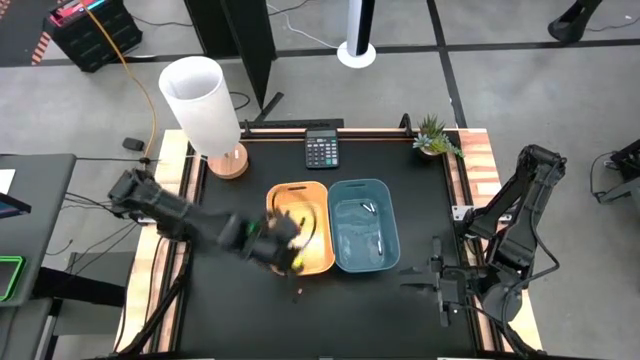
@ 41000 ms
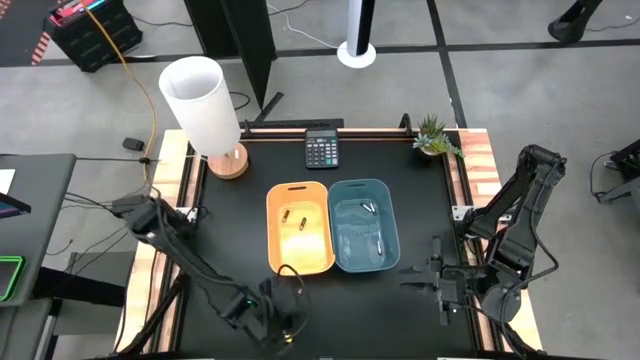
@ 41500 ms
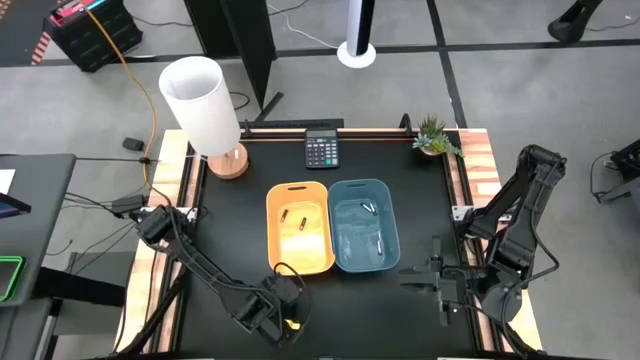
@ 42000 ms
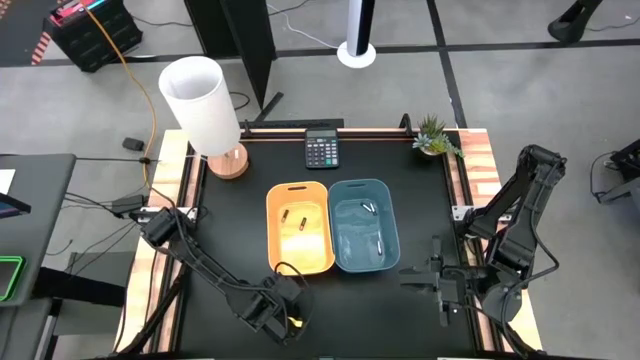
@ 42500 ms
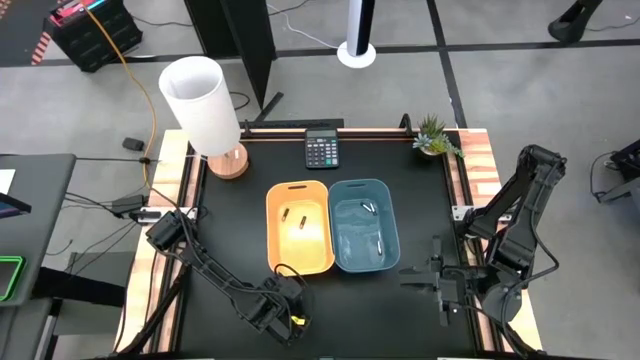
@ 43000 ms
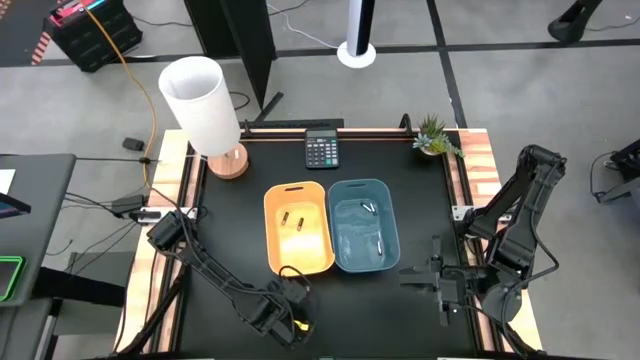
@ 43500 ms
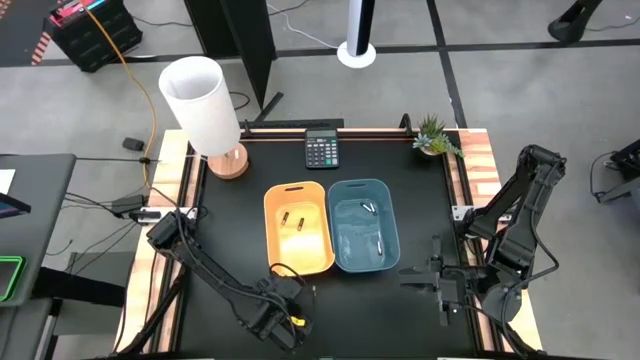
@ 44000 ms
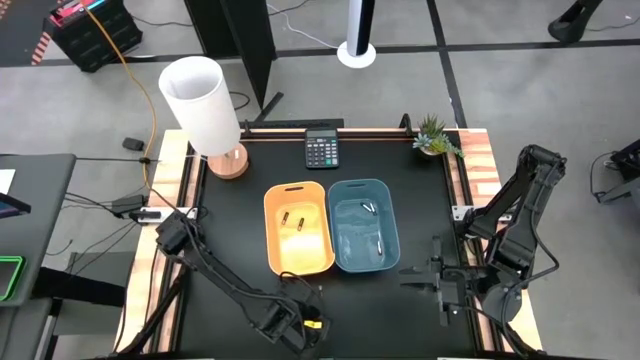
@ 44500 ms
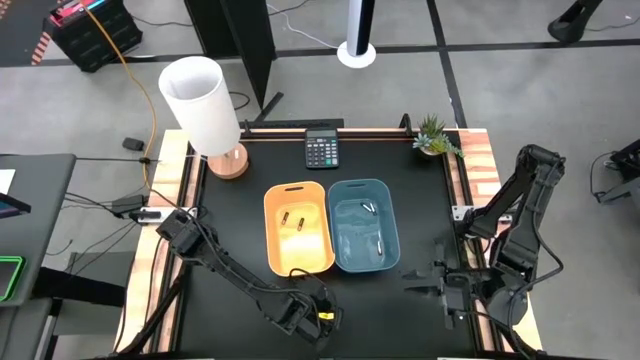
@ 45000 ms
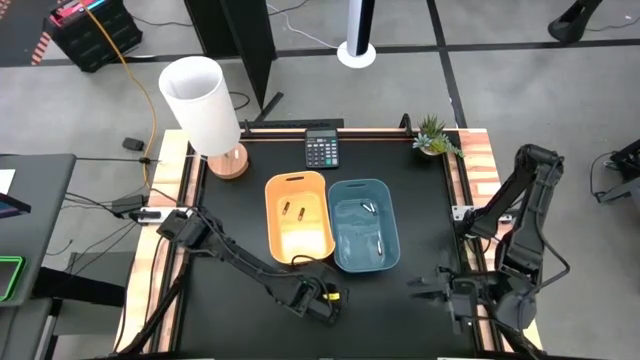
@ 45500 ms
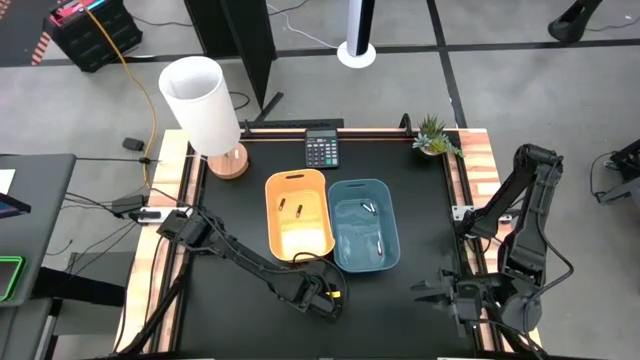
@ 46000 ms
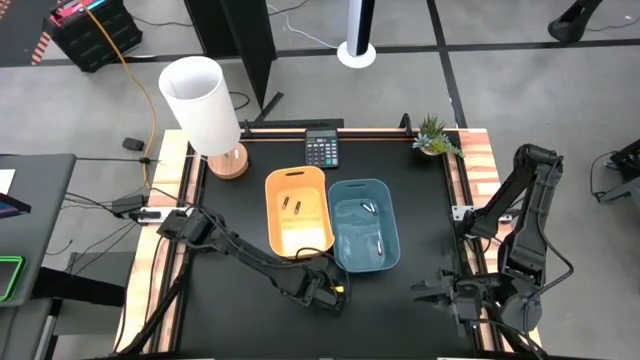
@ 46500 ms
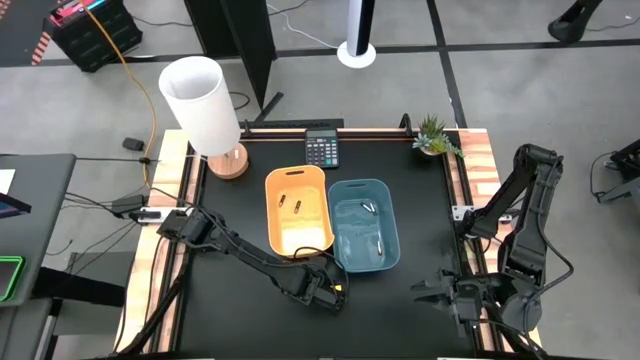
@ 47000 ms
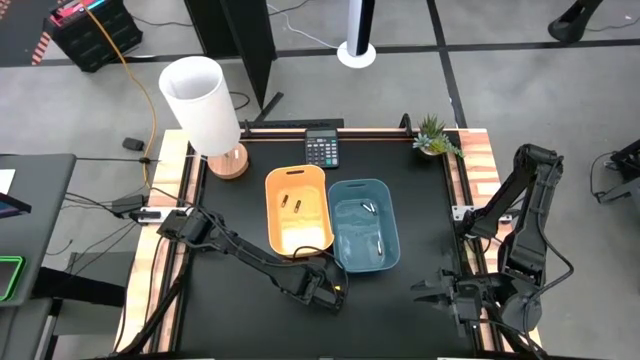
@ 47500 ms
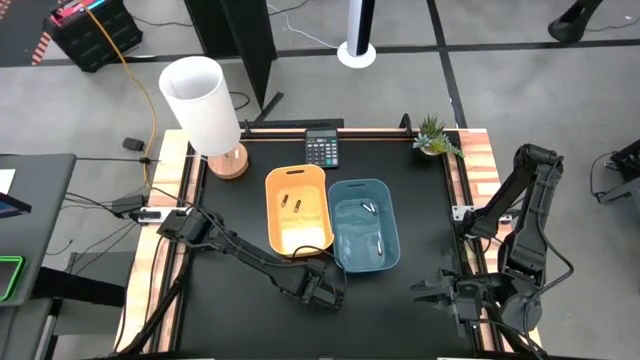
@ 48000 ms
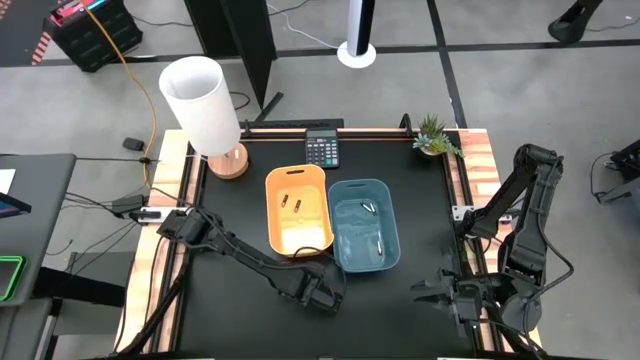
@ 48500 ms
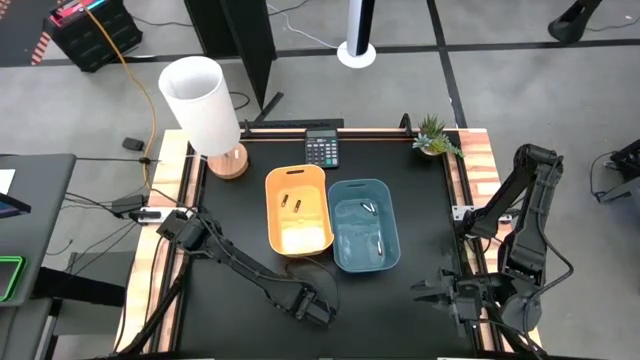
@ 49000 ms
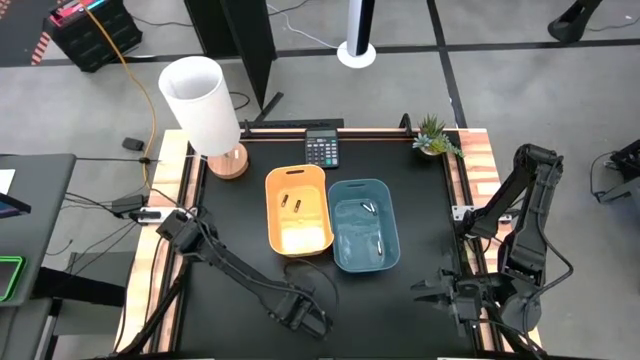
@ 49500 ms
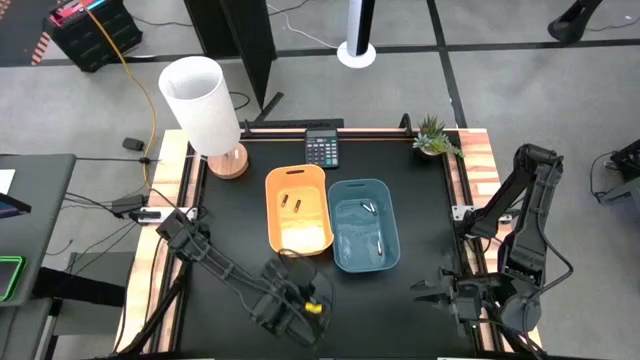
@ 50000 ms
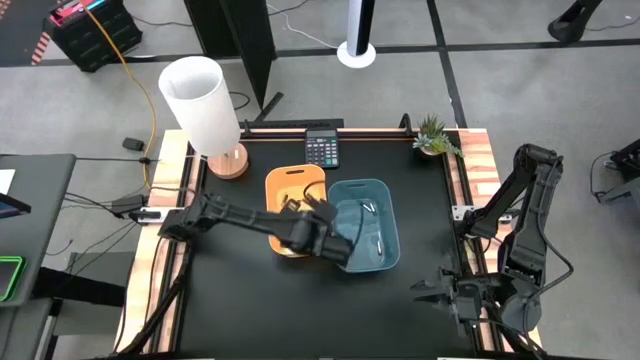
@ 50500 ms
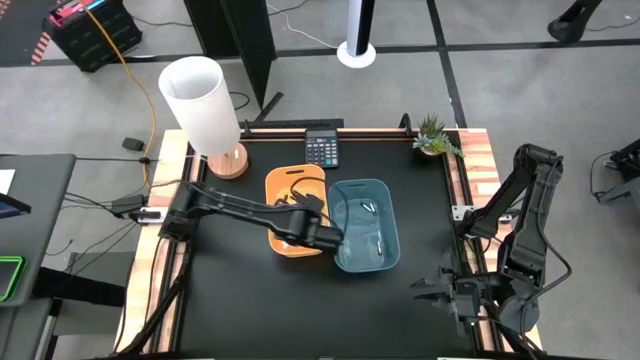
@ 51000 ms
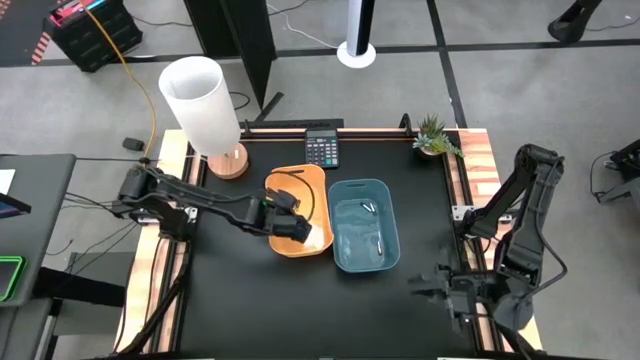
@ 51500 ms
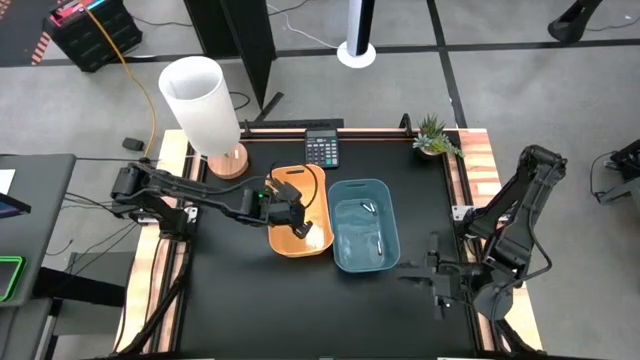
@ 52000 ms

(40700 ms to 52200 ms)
Task: Sort batteries
Put the black battery into the yellow bin

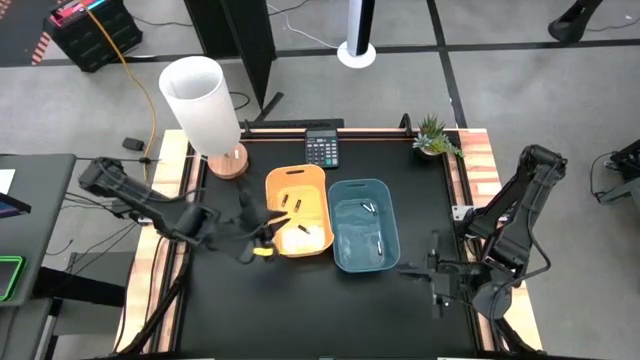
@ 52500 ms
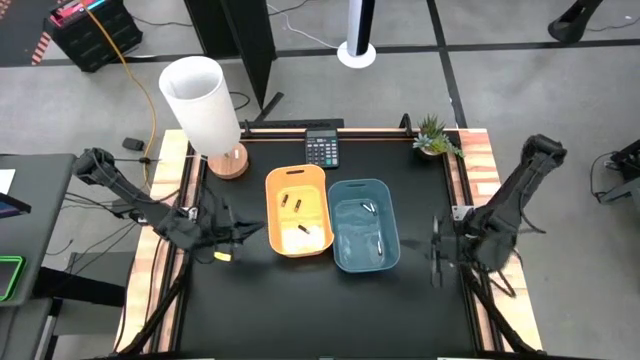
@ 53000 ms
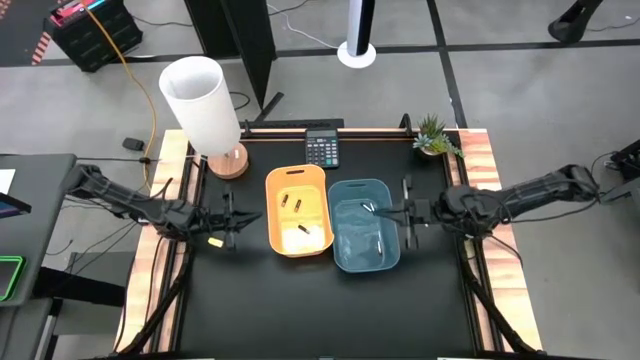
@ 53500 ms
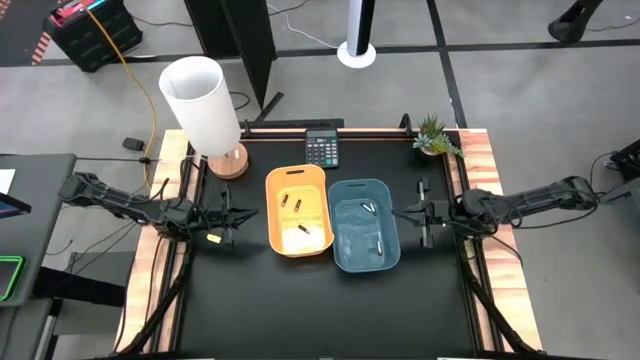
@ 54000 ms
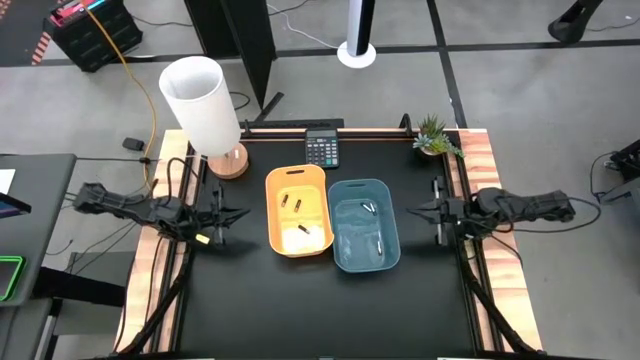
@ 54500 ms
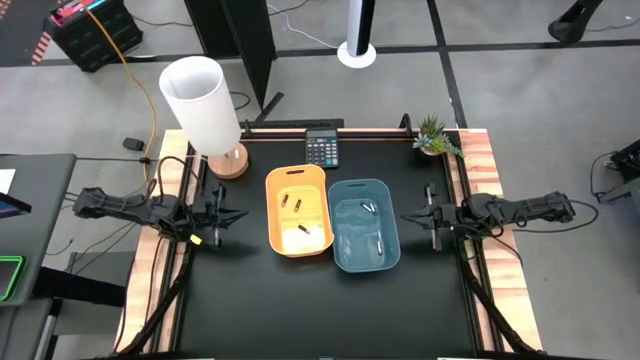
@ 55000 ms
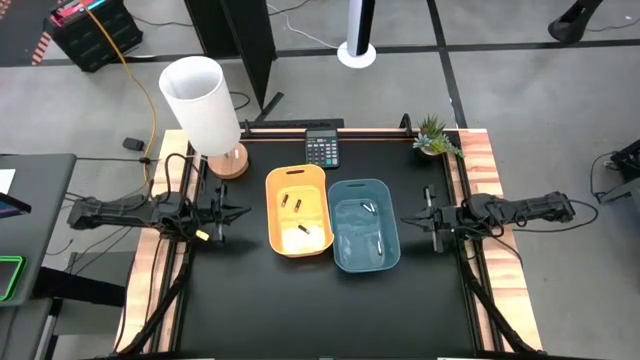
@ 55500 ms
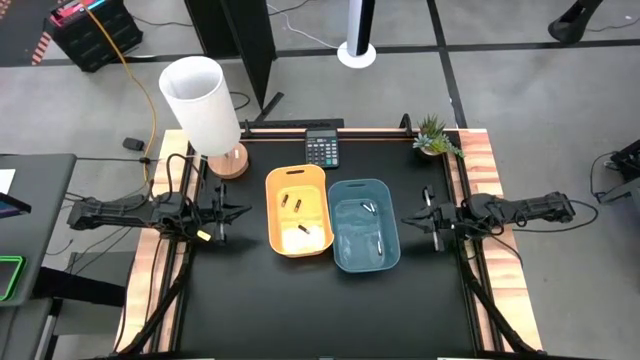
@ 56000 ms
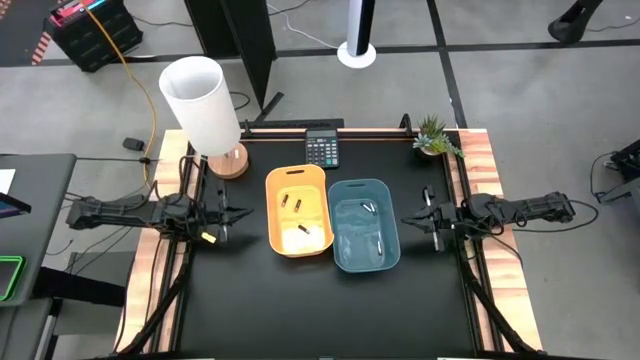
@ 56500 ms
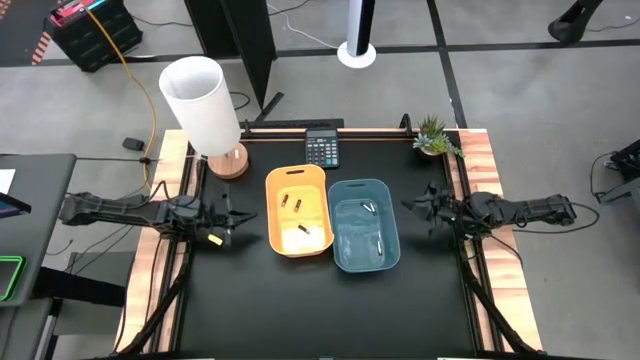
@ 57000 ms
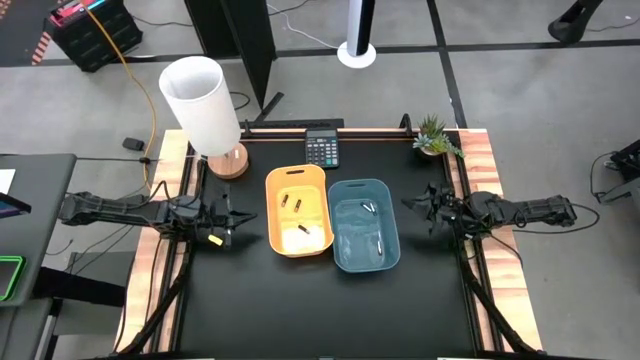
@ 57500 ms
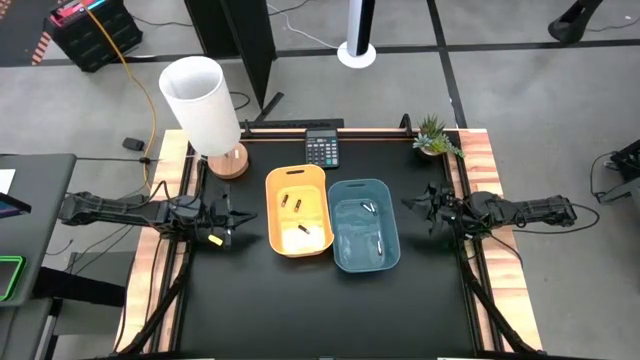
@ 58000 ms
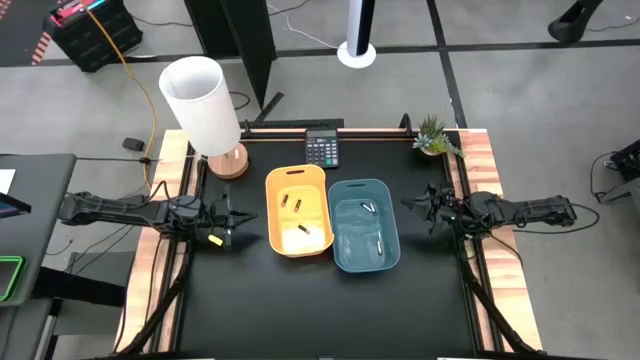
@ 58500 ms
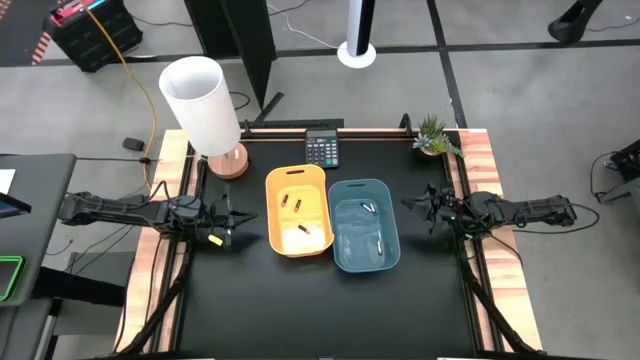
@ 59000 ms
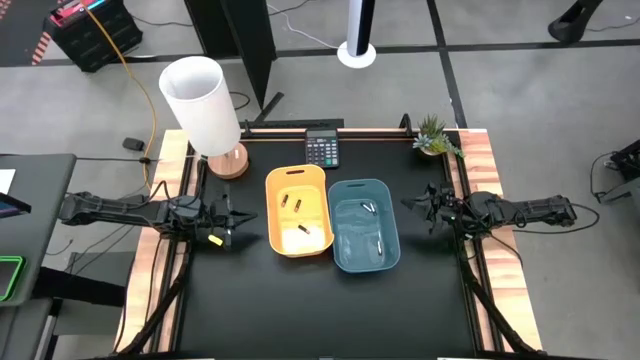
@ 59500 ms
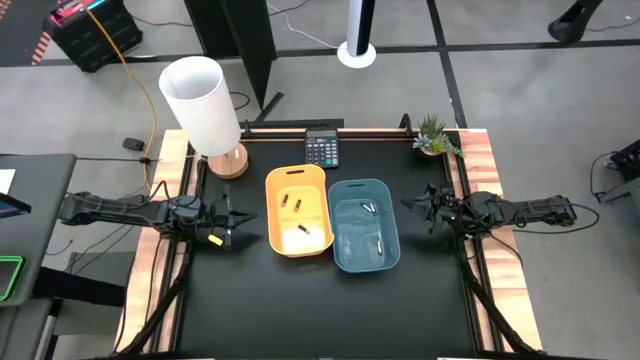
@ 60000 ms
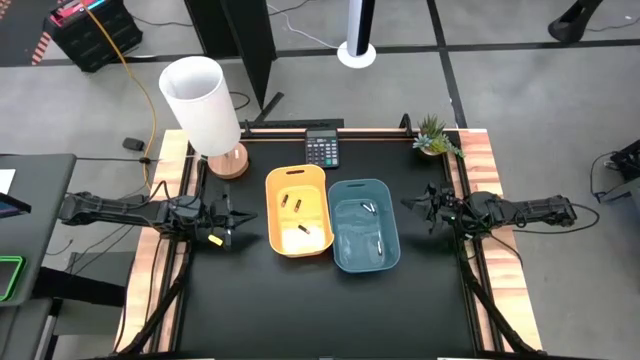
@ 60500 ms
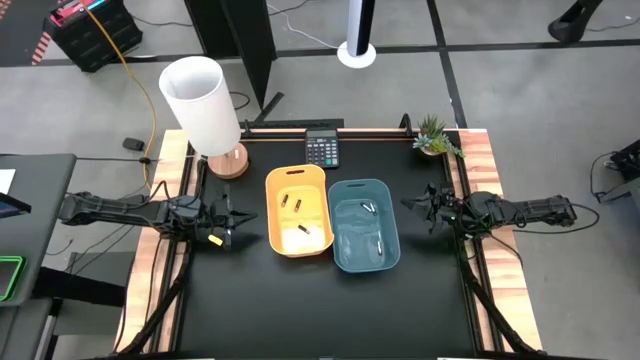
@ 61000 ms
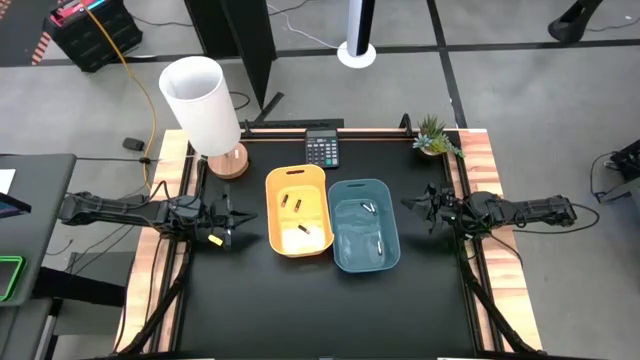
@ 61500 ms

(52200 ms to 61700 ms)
Return to Home Position
